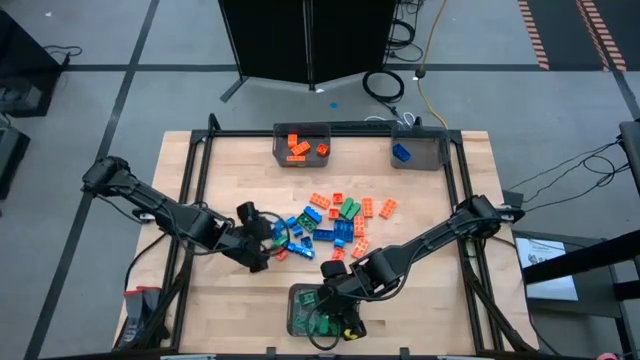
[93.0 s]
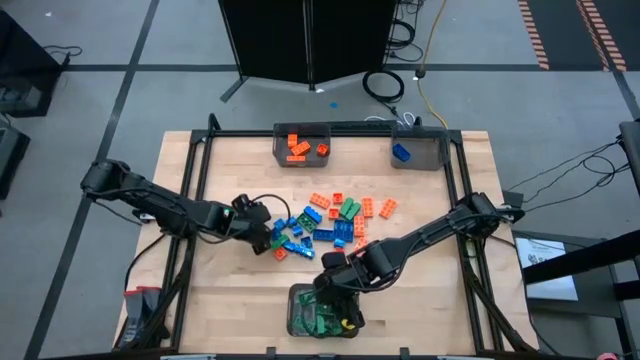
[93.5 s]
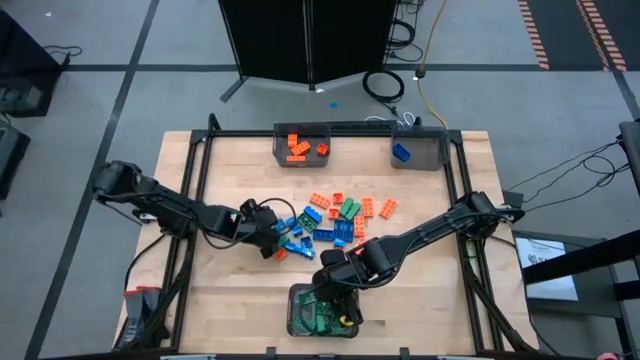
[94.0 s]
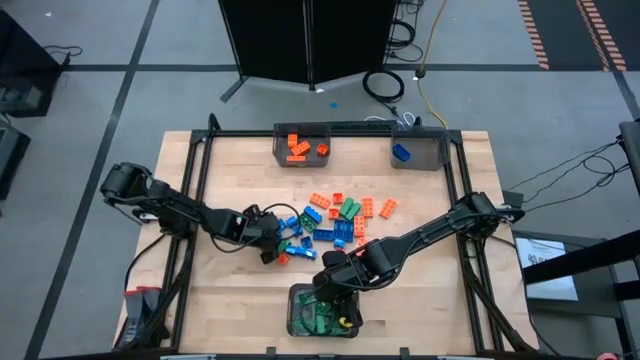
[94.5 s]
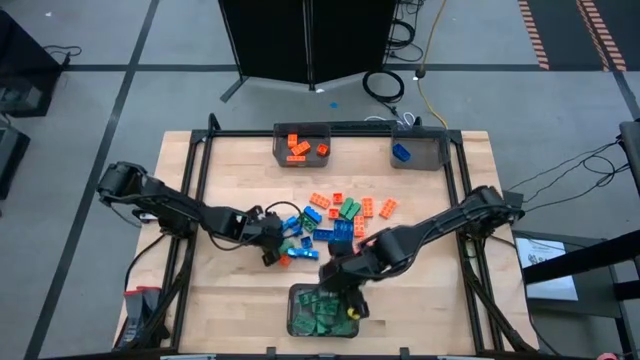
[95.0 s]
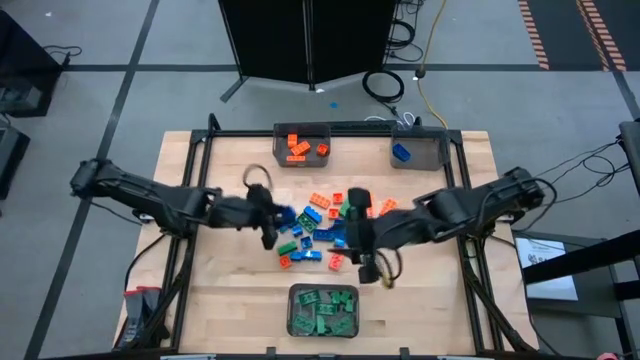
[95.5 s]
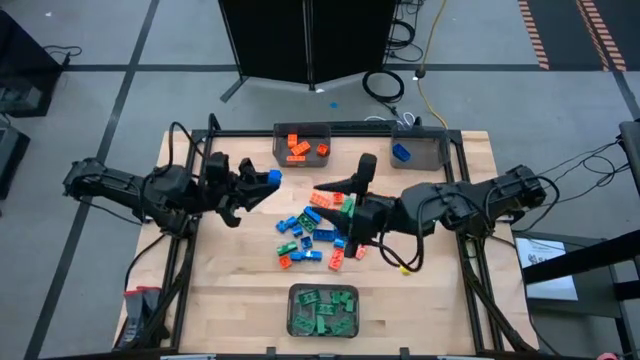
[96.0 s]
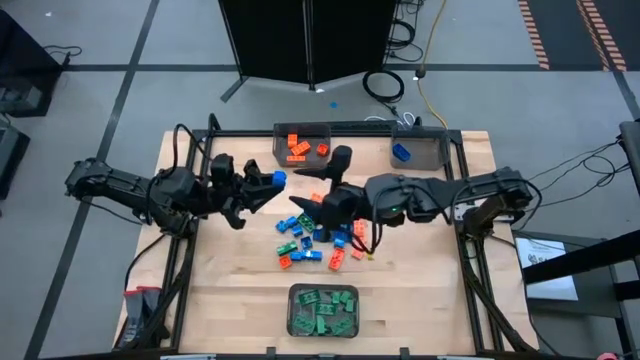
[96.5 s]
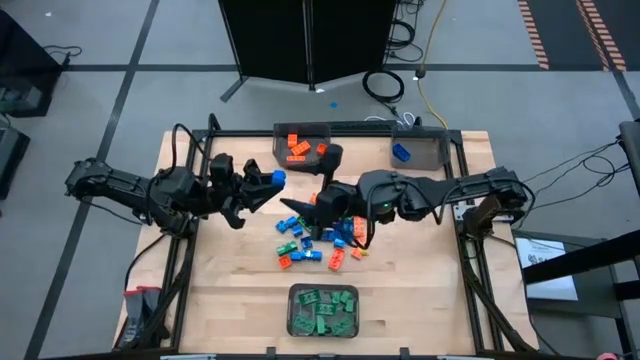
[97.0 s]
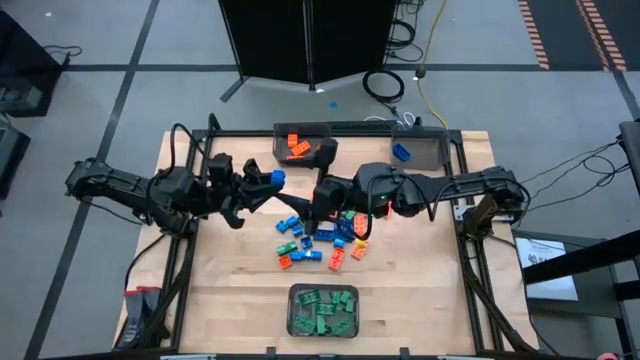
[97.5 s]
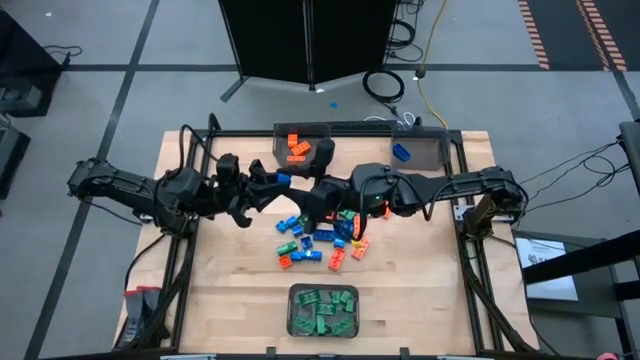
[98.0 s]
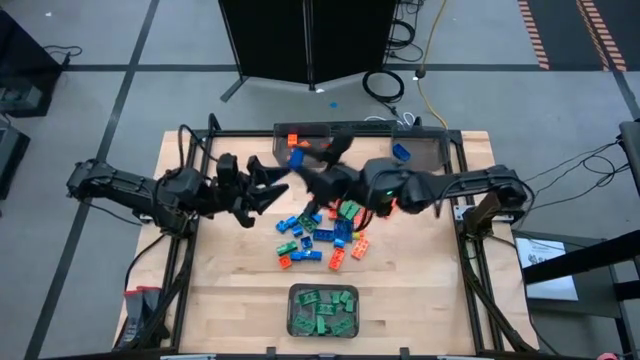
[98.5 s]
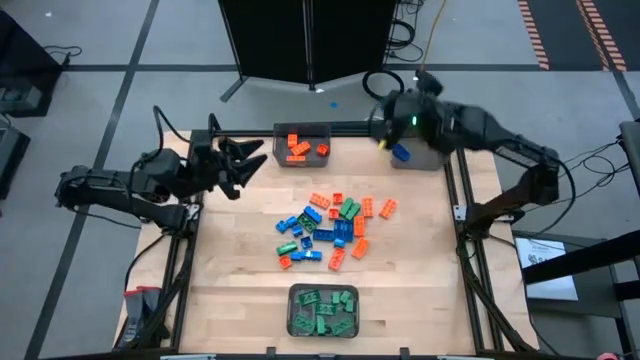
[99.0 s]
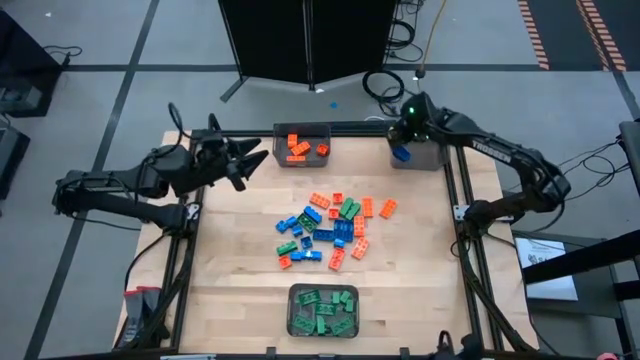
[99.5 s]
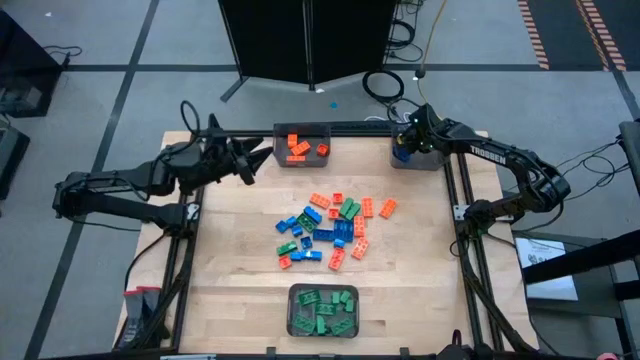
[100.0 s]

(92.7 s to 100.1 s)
Task: Sort blocks
Put the blue game piece into the top right black bin

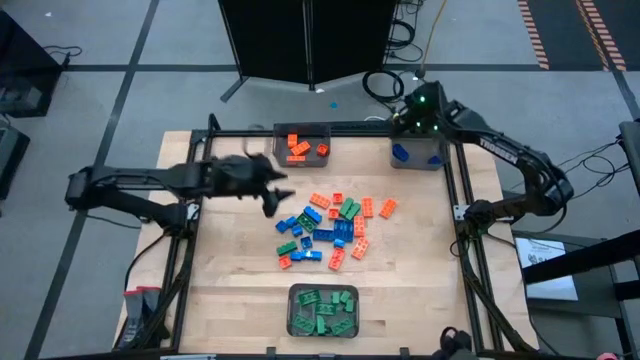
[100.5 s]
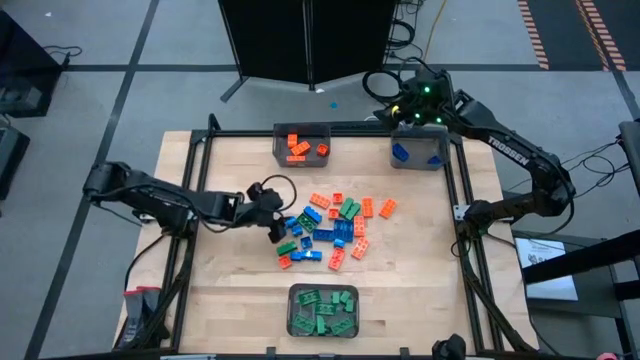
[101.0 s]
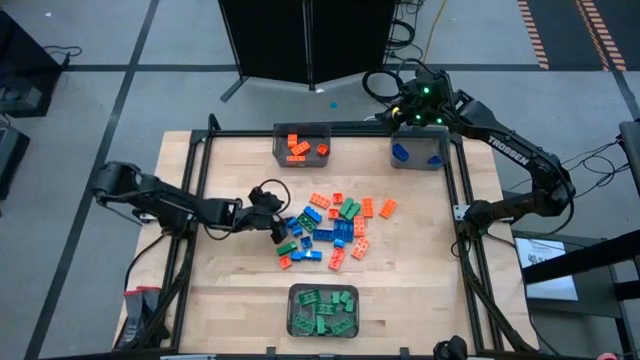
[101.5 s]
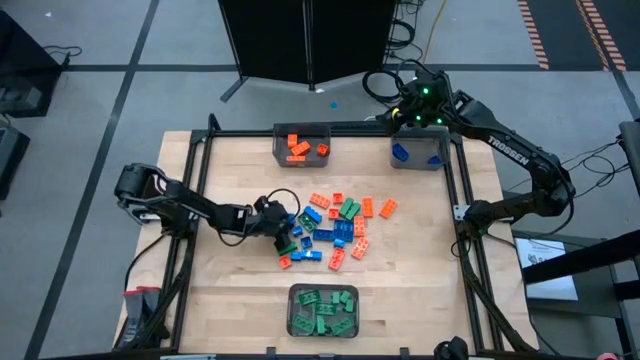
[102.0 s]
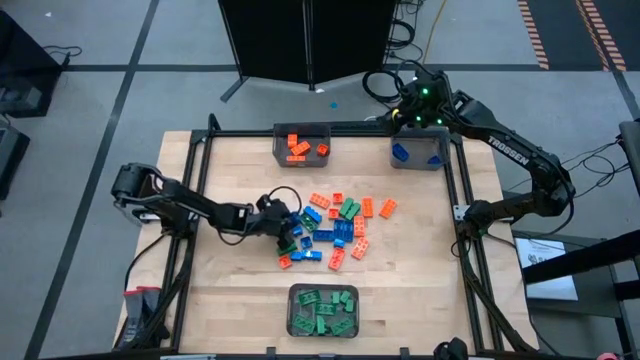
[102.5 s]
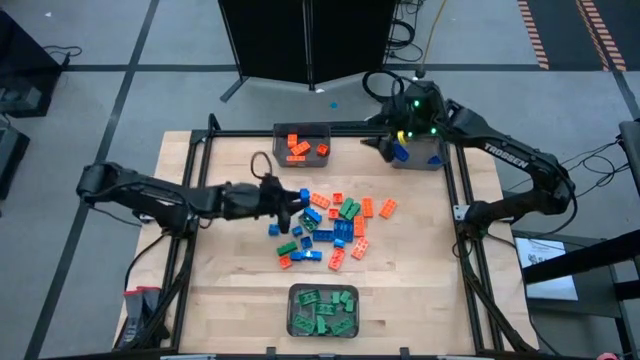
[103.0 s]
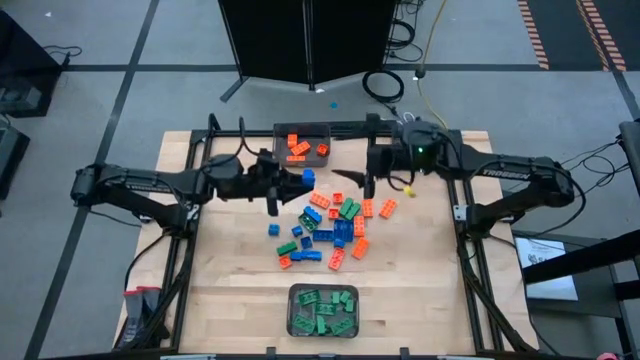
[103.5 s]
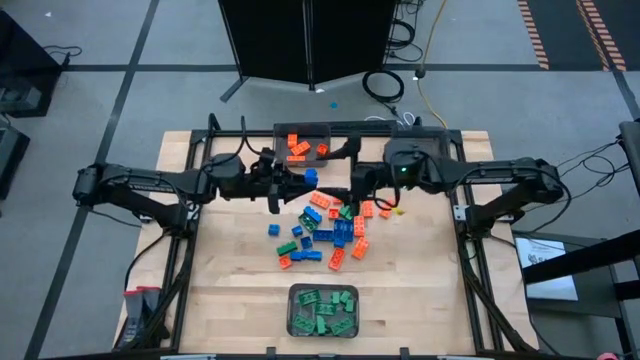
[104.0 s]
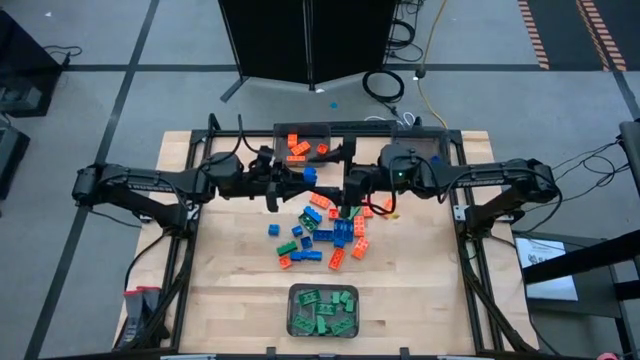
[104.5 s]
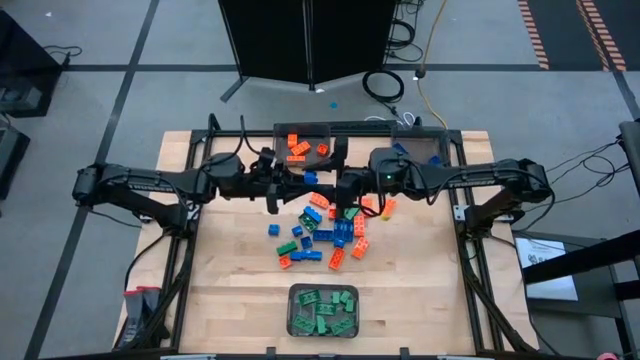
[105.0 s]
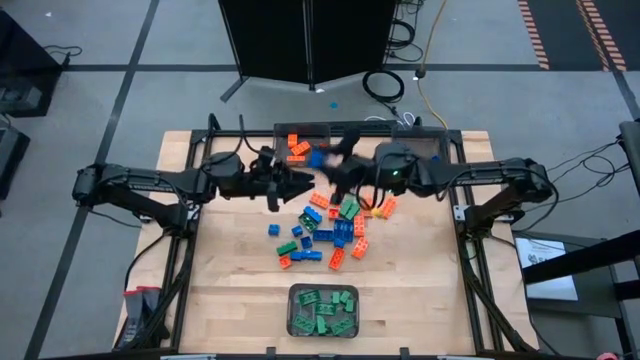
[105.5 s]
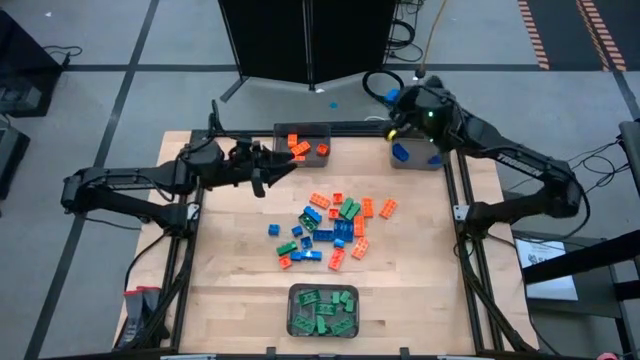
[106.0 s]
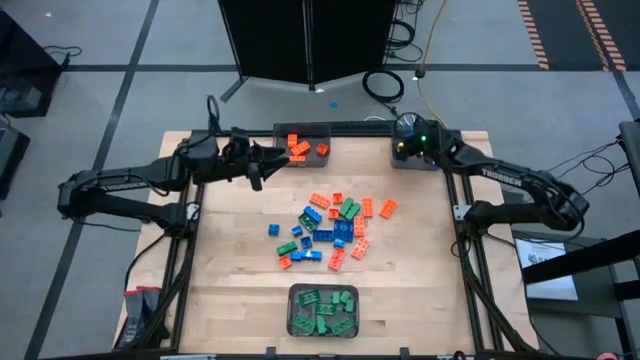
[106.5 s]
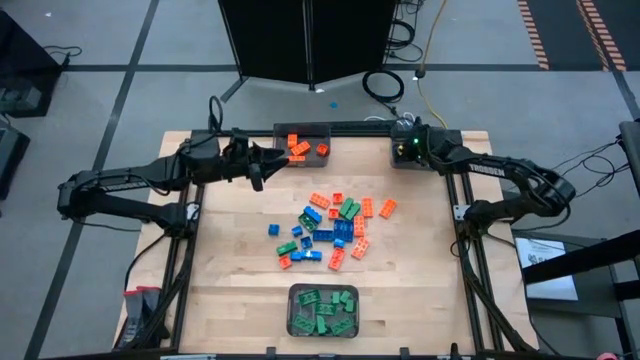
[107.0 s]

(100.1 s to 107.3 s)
Put the blue game piece into the top right black bin

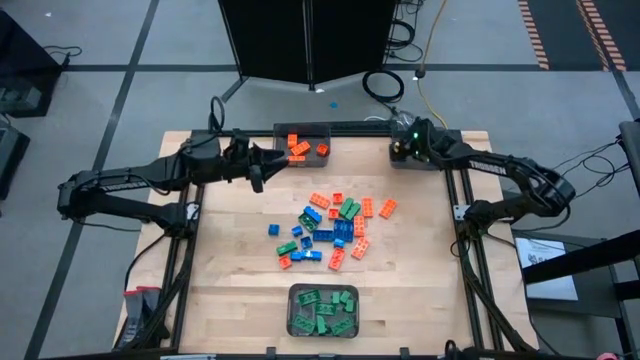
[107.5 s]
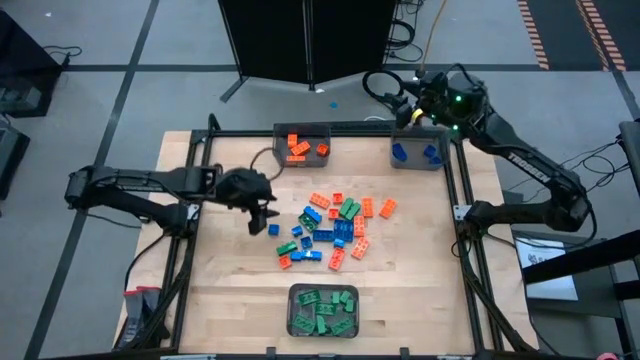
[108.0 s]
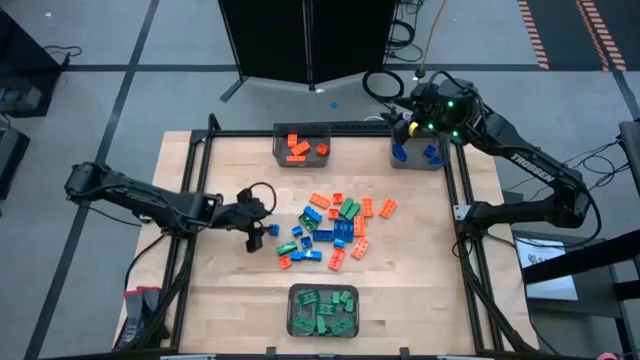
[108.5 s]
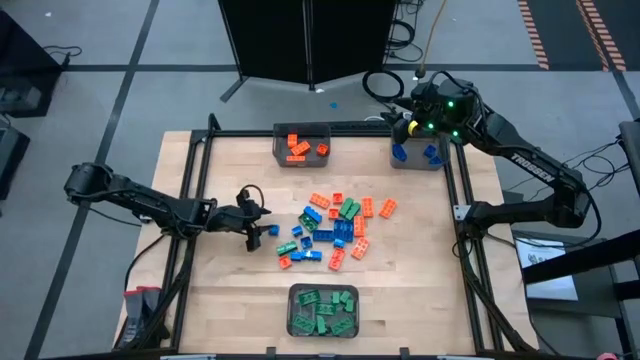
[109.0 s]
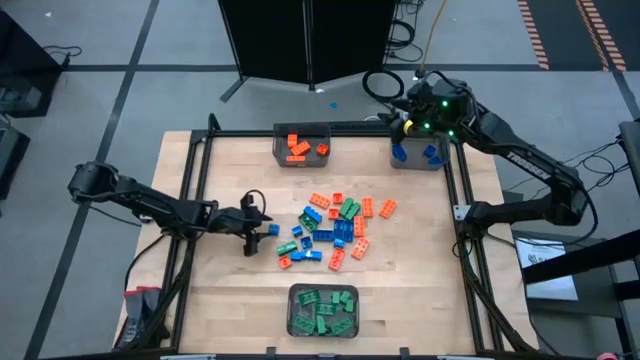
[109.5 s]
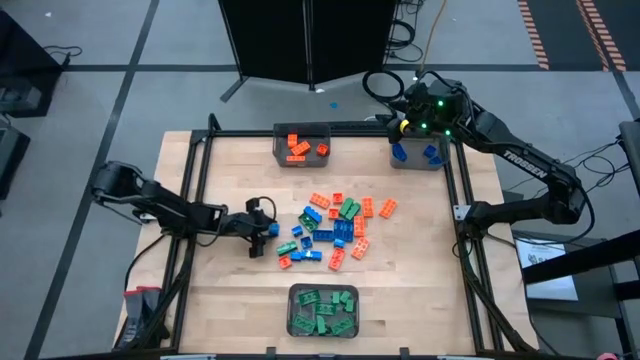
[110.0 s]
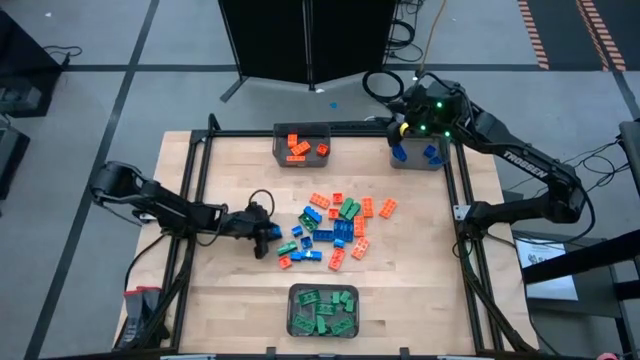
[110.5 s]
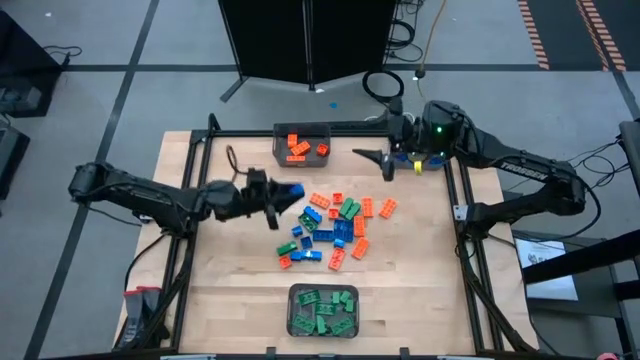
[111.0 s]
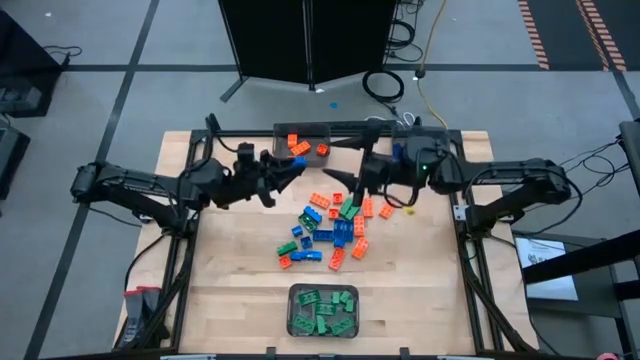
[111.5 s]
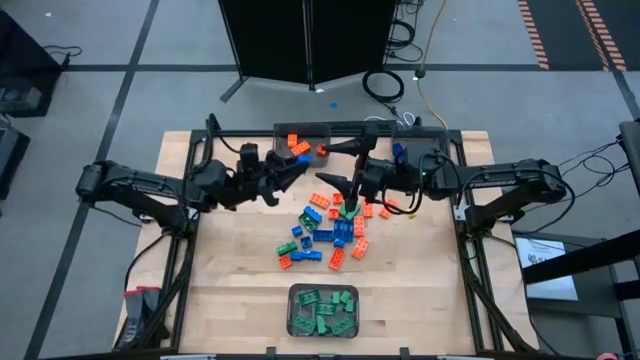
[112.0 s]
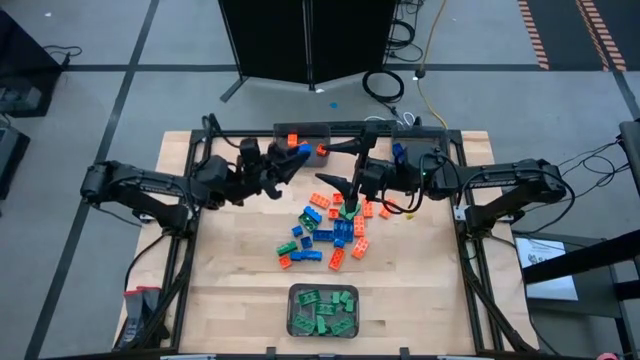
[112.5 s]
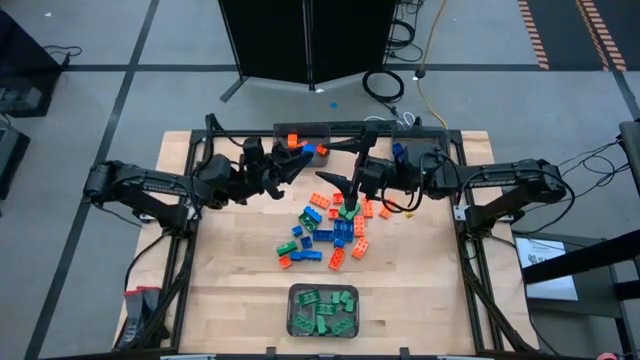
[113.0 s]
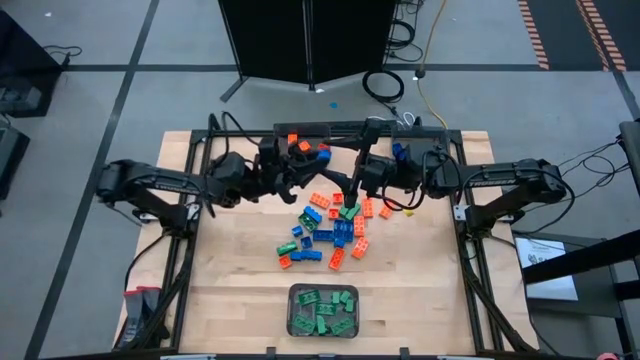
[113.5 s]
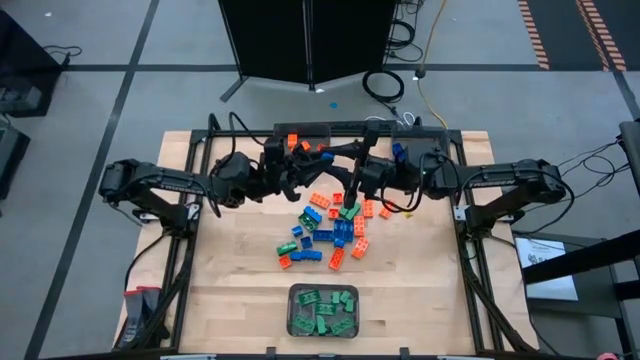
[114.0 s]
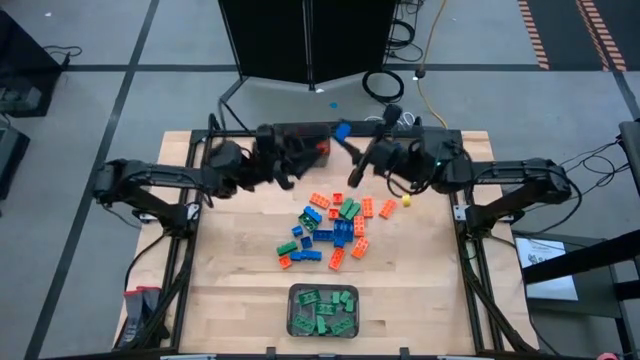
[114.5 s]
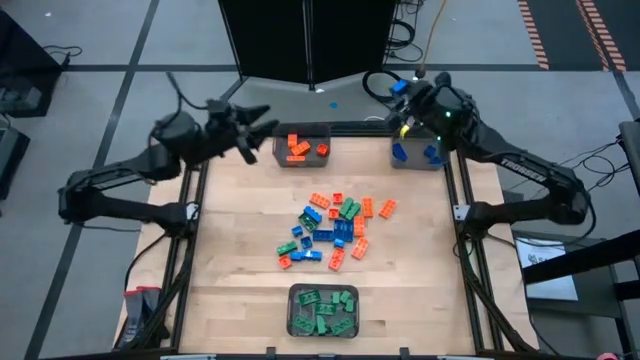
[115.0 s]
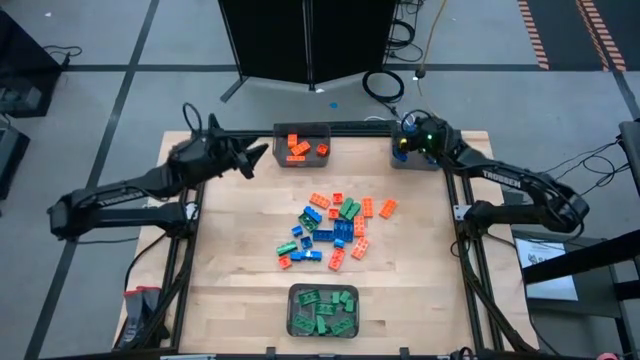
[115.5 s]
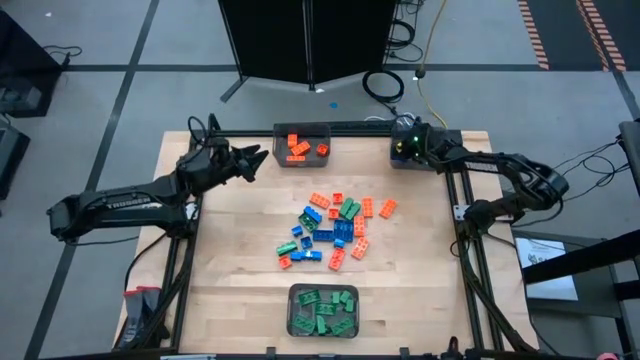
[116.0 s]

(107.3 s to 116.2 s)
Put the blue game piece into the top right black bin
